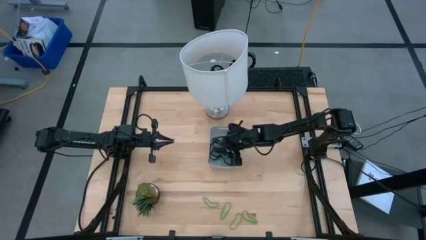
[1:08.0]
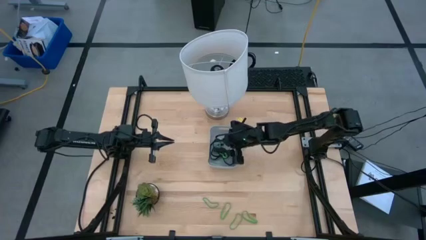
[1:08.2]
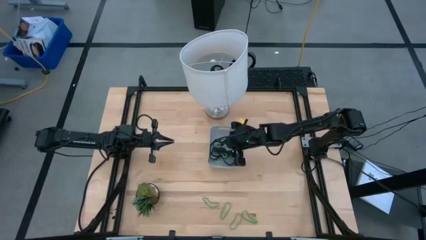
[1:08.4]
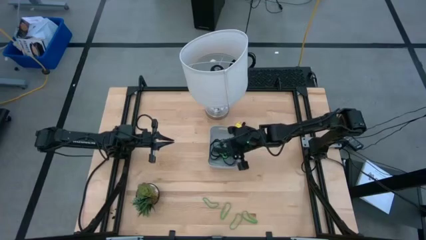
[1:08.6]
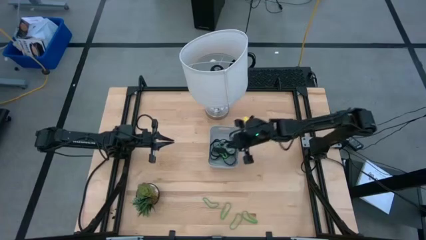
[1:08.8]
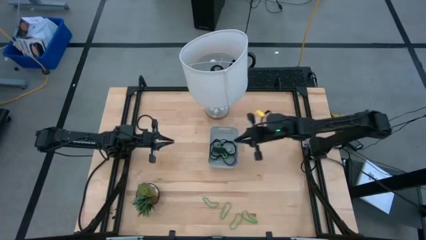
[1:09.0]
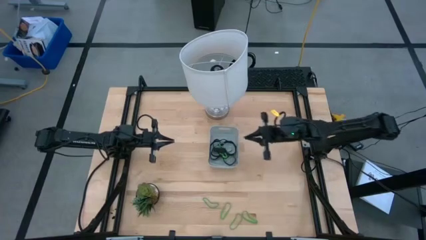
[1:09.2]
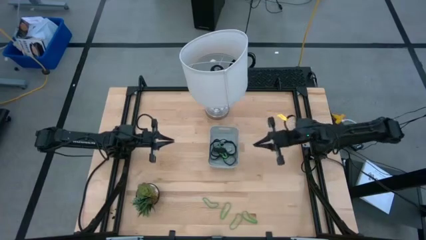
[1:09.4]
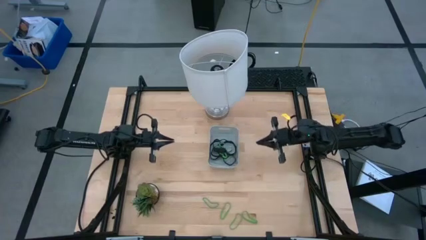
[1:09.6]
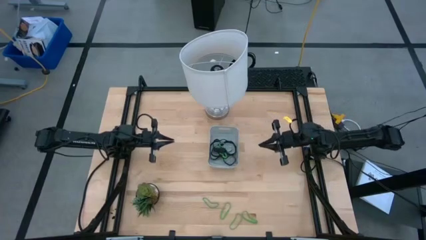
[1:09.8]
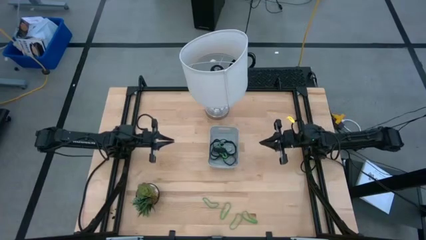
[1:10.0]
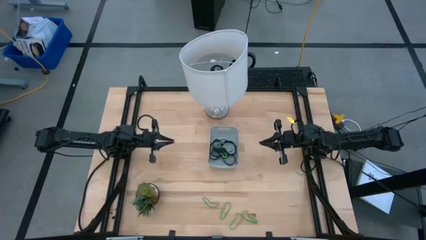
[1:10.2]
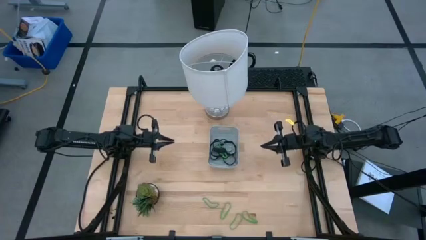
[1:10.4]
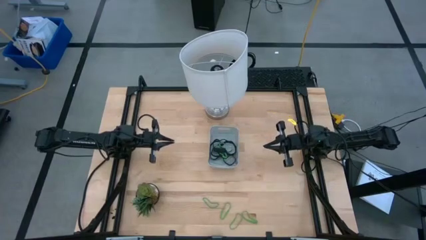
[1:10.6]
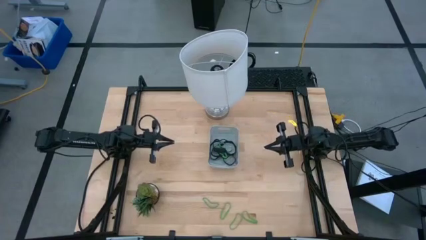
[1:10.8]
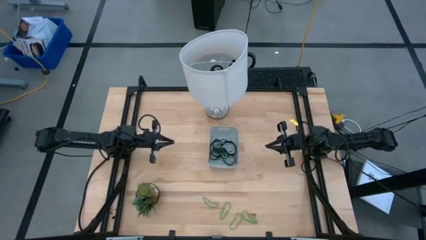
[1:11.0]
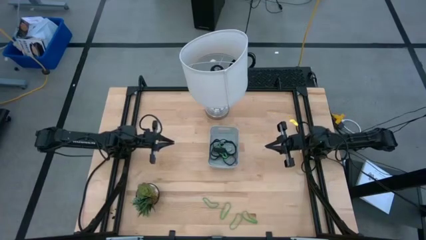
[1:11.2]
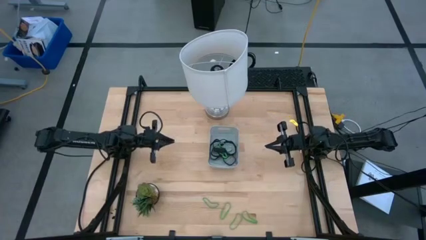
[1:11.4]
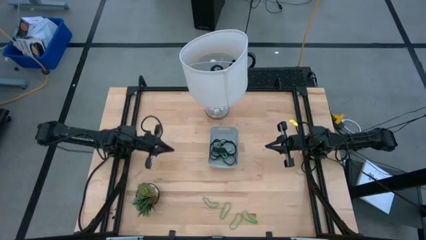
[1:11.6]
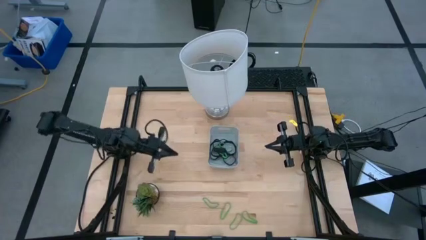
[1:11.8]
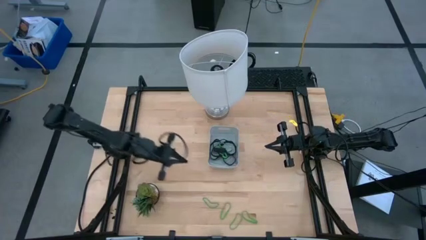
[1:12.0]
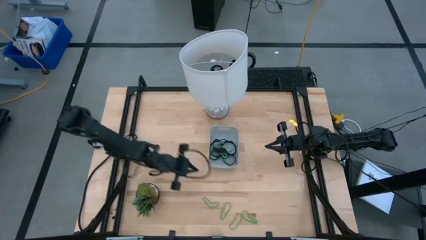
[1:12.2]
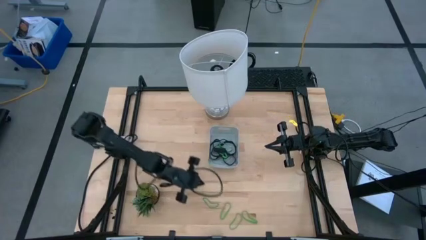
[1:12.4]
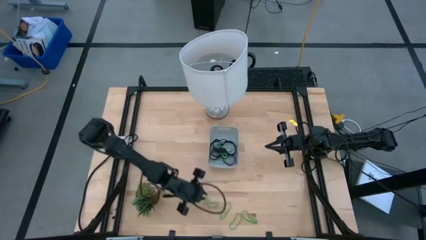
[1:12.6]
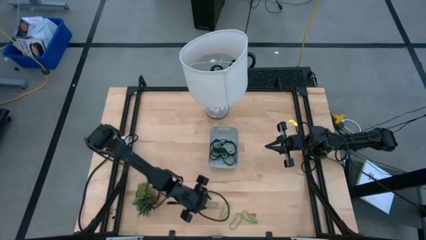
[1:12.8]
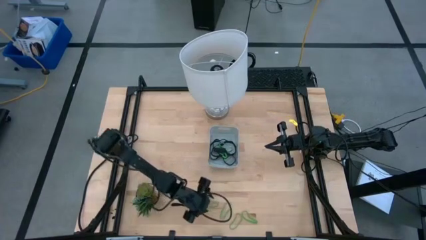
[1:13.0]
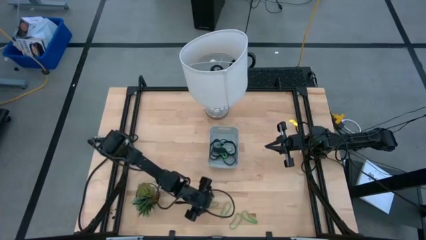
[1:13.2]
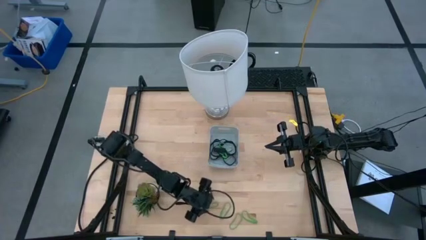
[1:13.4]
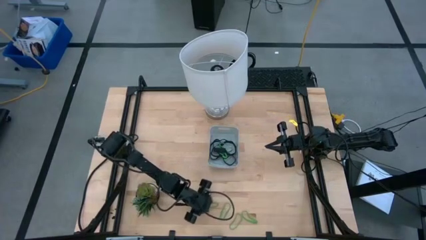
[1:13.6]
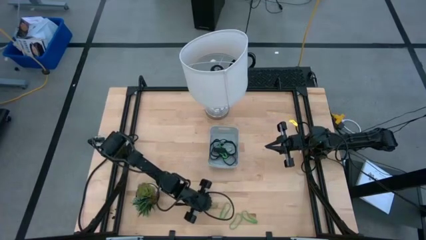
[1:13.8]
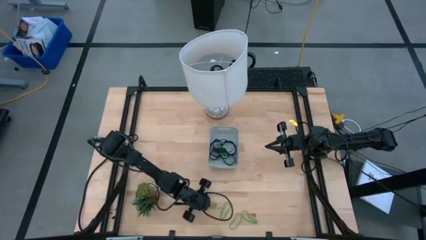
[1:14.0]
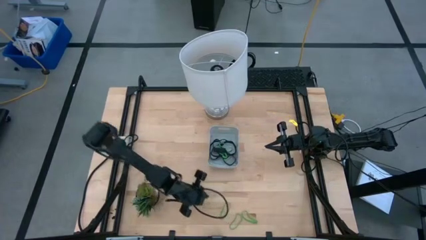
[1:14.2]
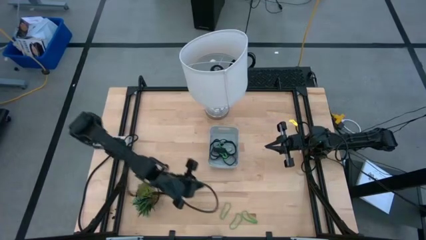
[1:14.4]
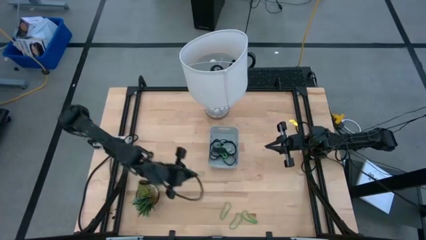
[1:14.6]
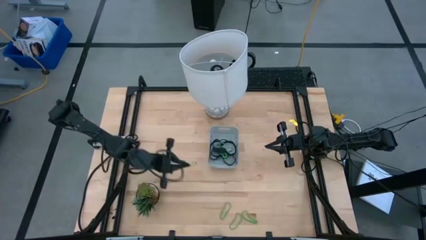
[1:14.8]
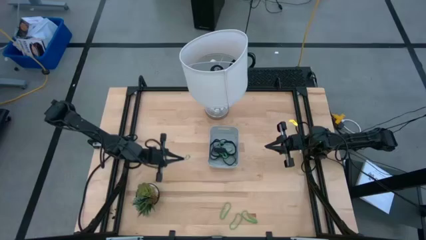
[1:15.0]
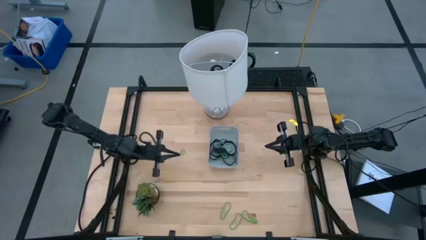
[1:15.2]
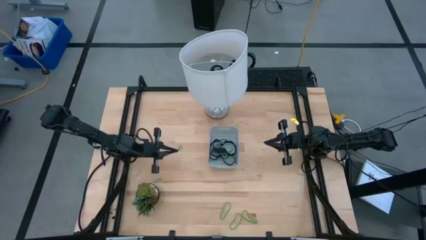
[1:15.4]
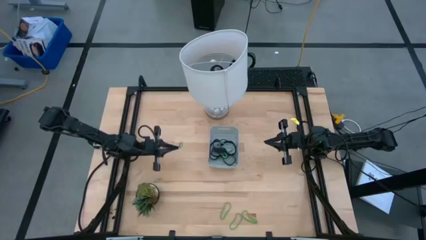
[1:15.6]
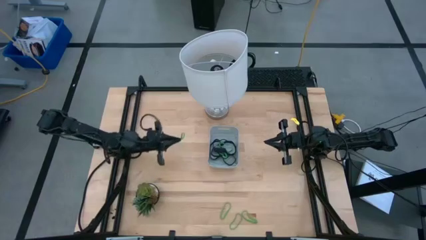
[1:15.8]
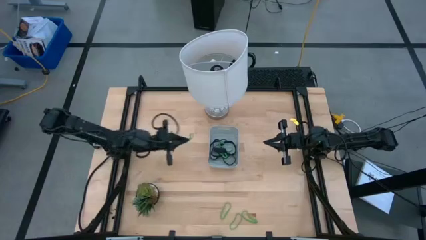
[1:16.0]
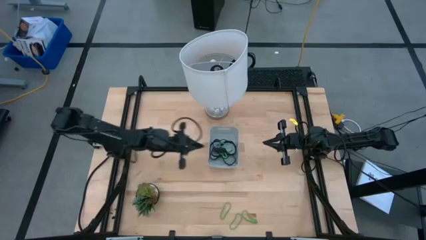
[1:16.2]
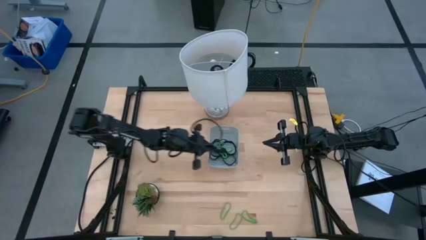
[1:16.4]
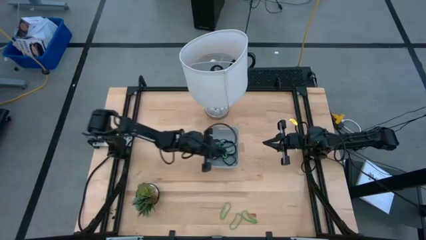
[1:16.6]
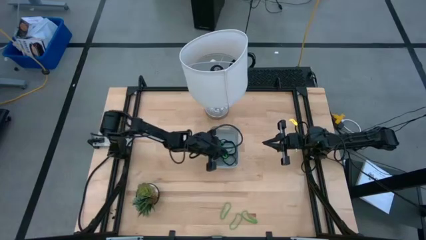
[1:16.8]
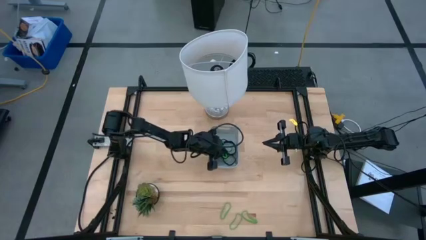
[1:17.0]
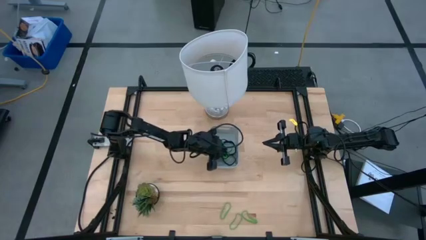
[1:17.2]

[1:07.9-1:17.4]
Task: Pick and place rubber bands into bin
Put the green rubber band into the gray bin

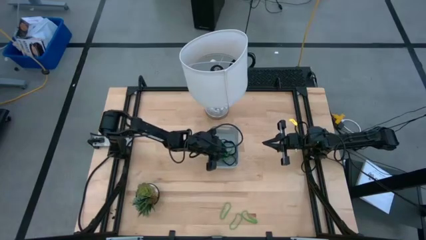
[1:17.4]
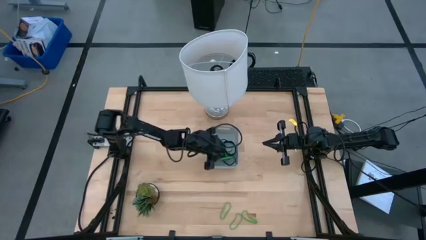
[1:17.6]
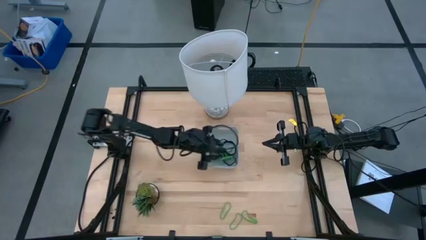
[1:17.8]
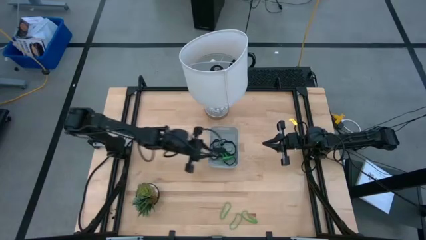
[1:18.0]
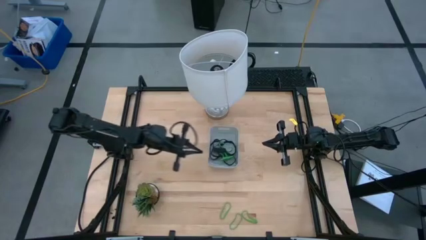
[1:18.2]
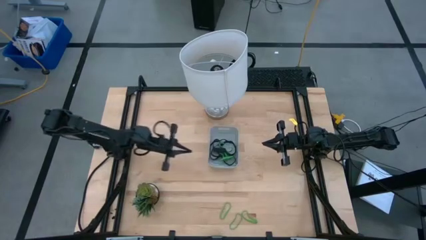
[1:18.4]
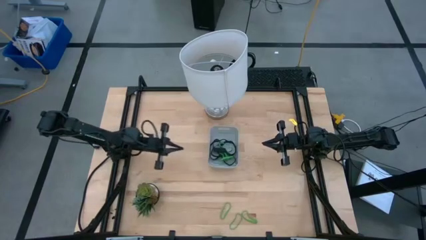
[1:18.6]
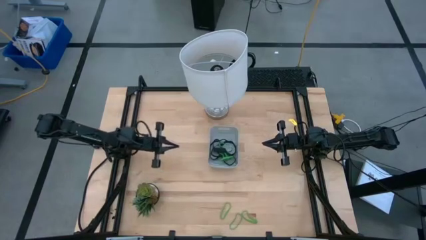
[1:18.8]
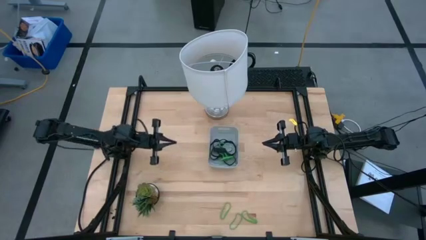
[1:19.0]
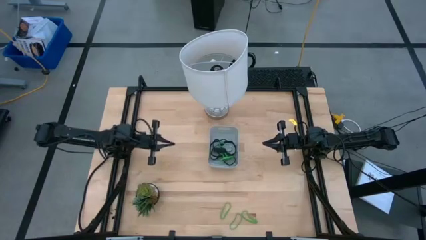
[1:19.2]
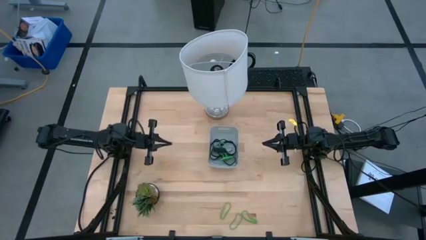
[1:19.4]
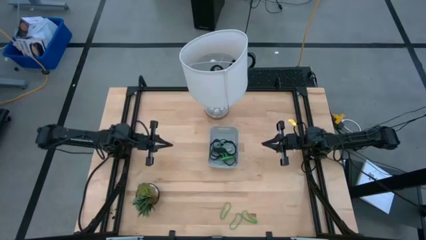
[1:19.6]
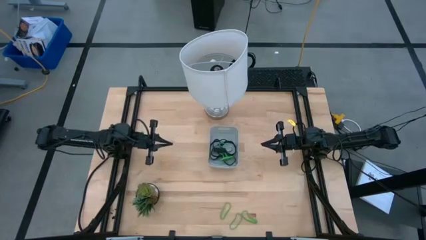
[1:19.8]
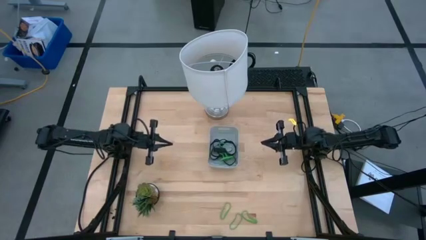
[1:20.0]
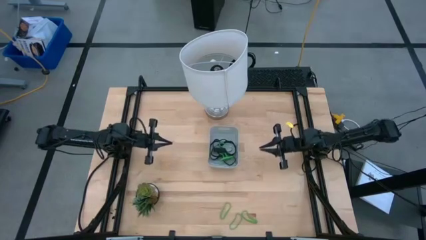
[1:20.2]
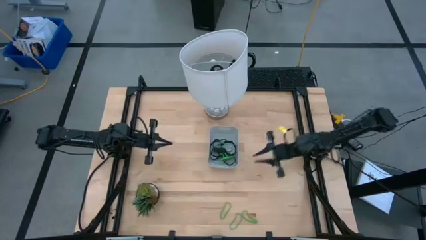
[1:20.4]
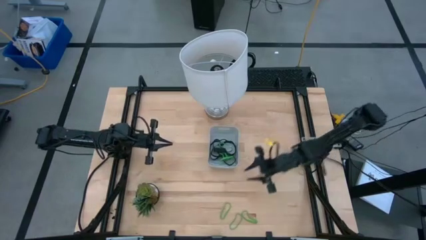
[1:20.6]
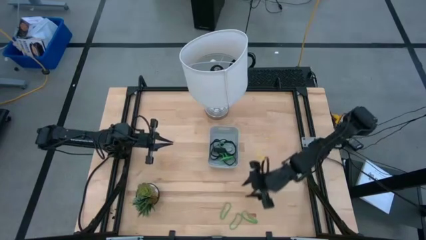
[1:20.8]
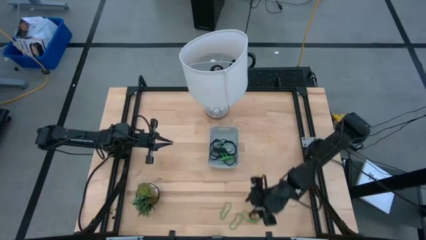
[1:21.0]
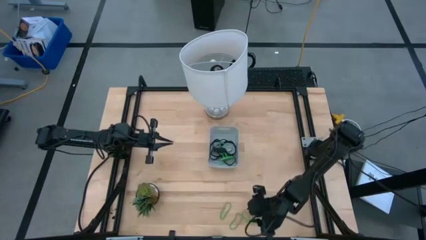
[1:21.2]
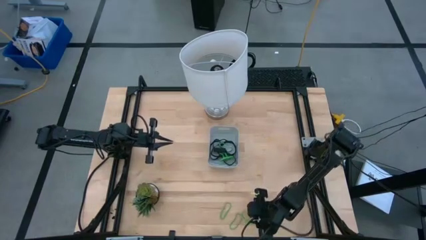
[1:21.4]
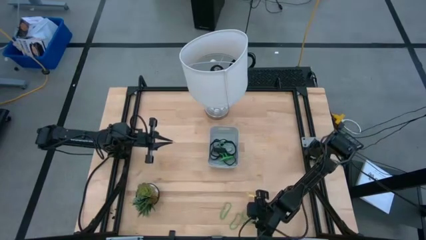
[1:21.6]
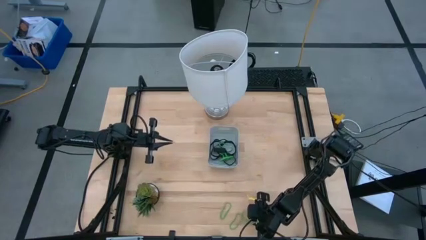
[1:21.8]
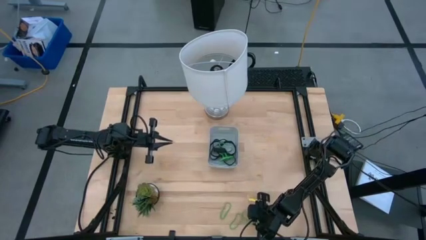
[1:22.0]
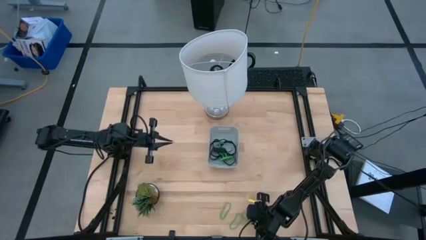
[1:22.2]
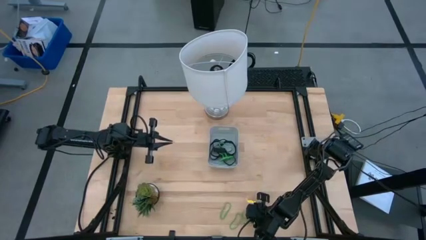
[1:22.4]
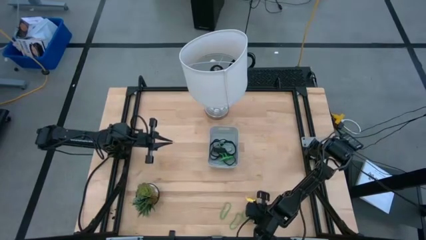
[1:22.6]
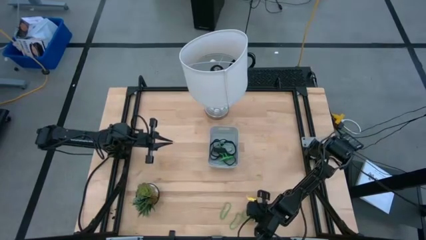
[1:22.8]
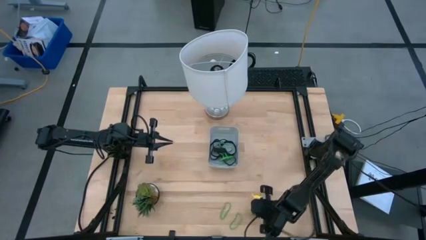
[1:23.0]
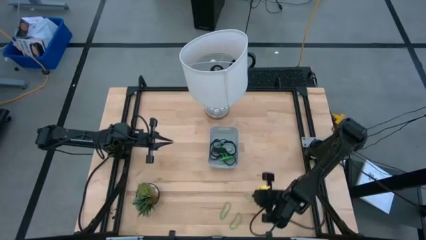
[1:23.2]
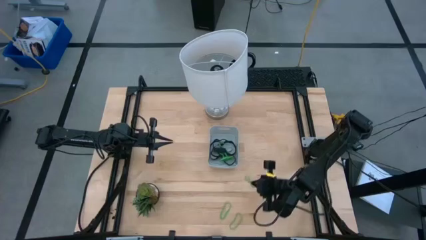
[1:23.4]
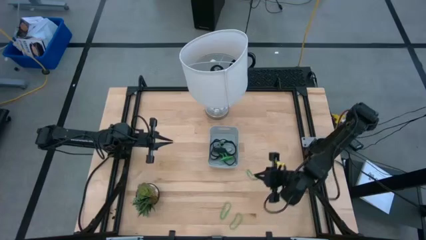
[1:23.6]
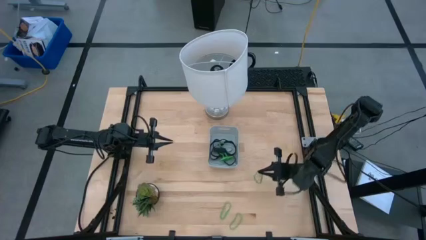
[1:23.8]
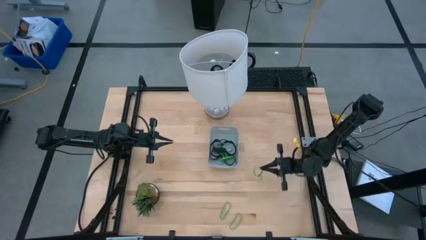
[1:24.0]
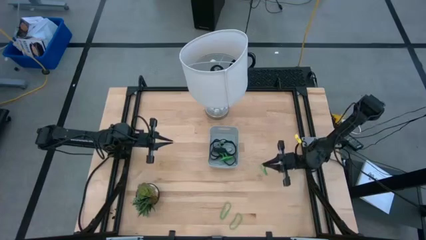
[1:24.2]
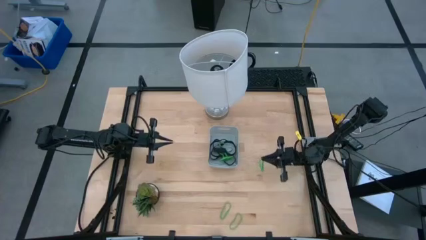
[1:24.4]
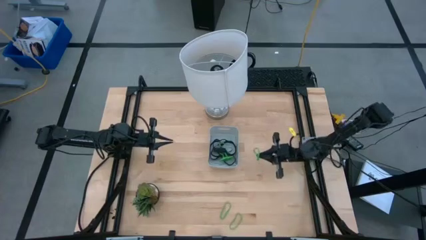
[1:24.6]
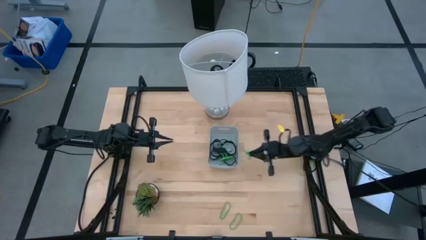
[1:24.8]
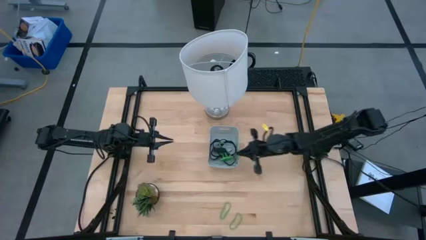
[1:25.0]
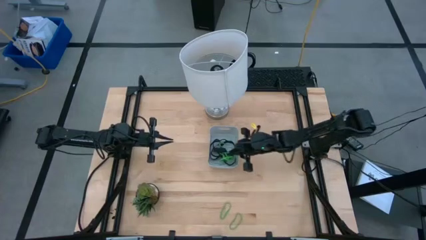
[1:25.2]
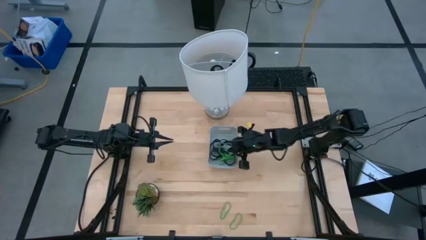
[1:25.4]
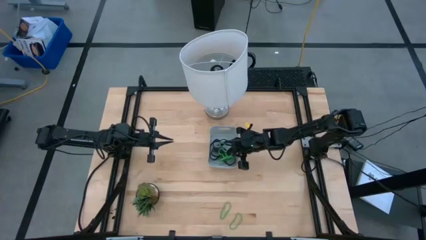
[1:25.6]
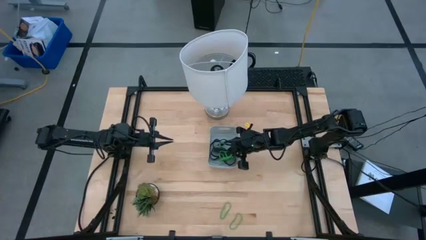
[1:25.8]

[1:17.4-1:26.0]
Put the green rubber band into the gray bin
